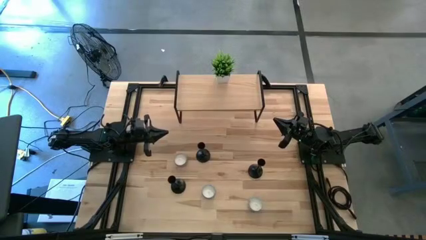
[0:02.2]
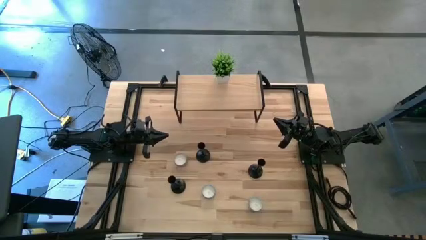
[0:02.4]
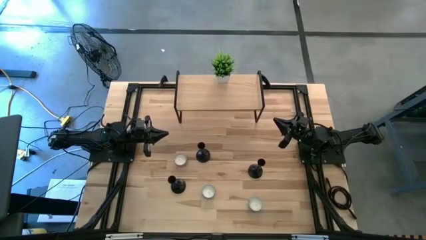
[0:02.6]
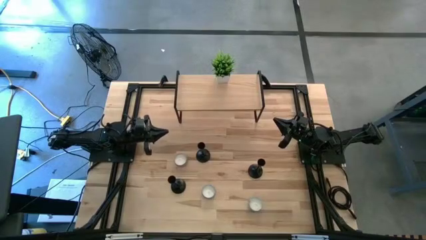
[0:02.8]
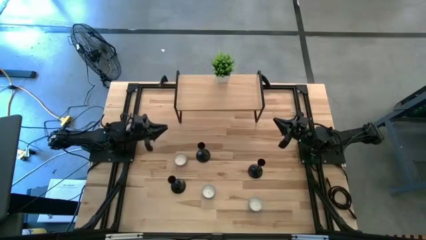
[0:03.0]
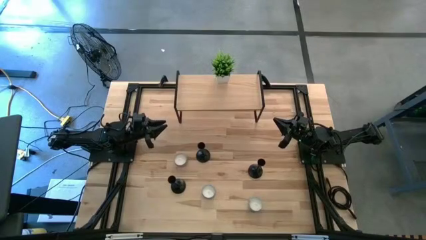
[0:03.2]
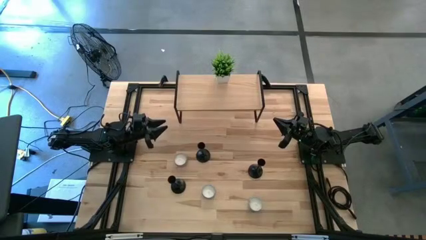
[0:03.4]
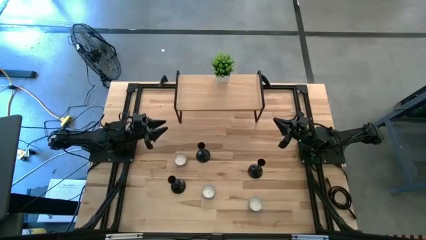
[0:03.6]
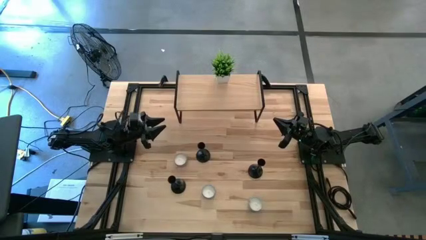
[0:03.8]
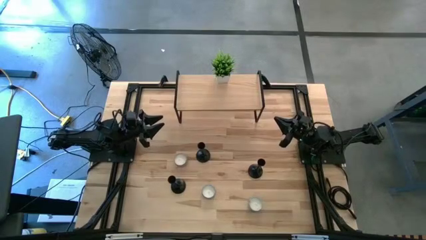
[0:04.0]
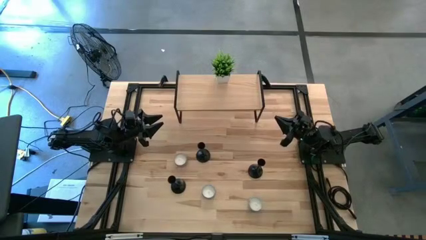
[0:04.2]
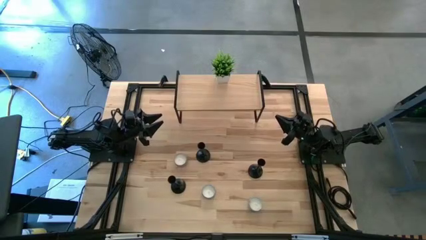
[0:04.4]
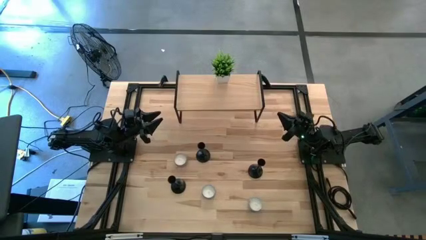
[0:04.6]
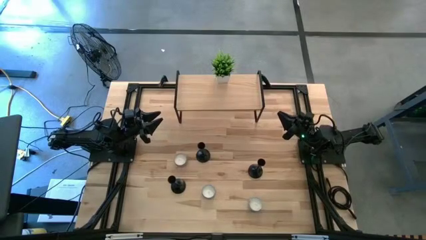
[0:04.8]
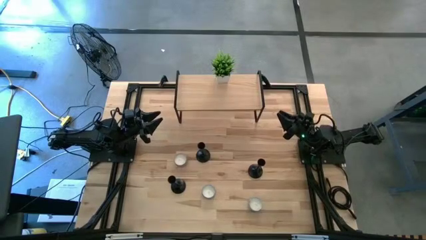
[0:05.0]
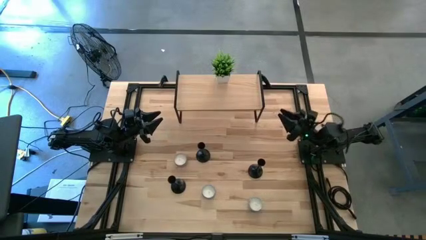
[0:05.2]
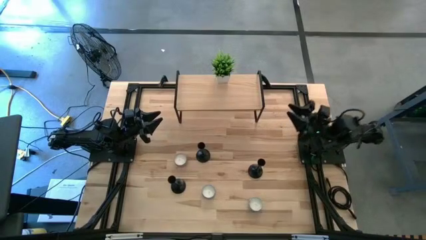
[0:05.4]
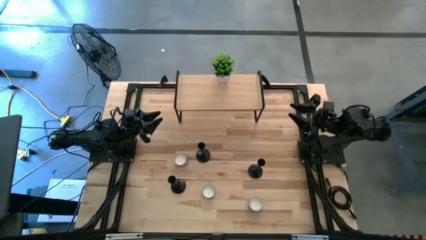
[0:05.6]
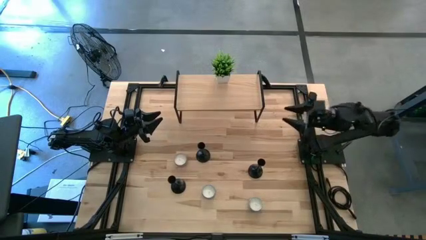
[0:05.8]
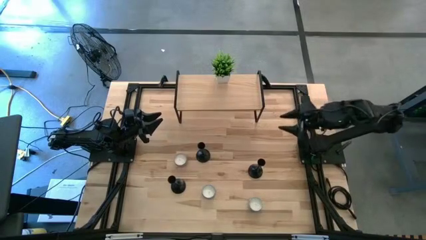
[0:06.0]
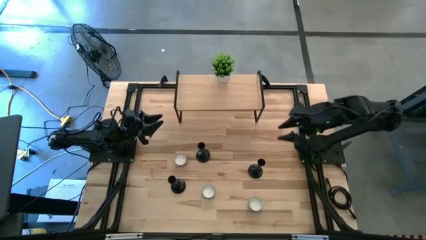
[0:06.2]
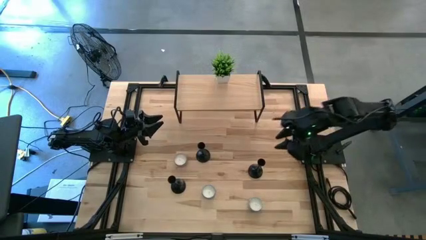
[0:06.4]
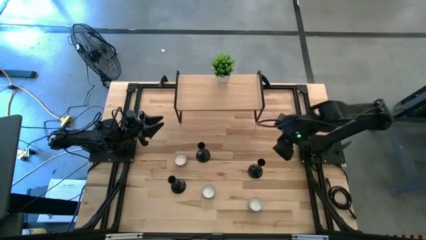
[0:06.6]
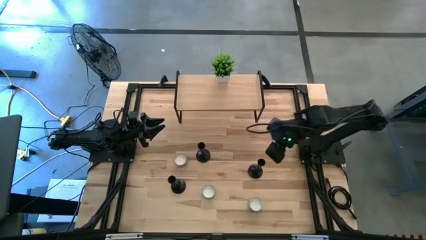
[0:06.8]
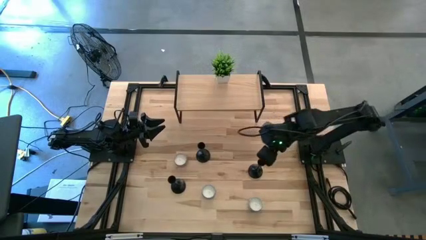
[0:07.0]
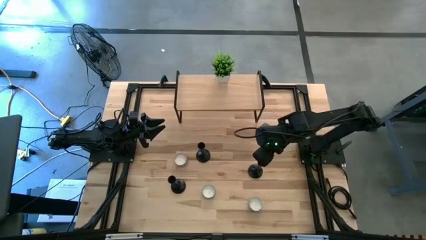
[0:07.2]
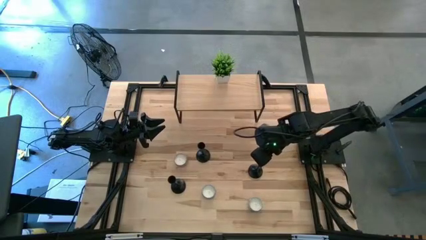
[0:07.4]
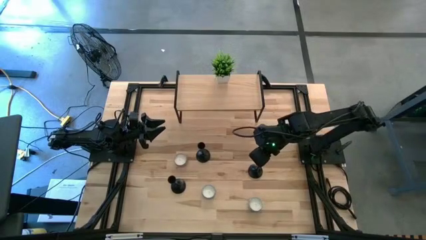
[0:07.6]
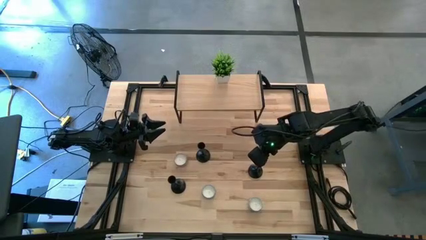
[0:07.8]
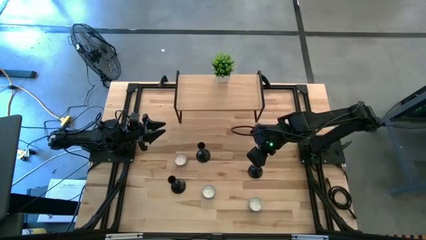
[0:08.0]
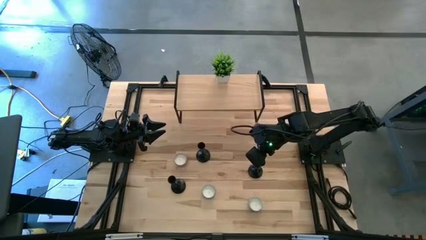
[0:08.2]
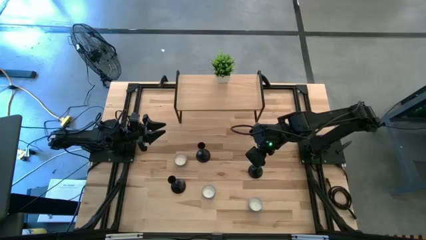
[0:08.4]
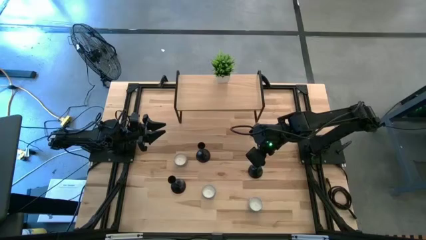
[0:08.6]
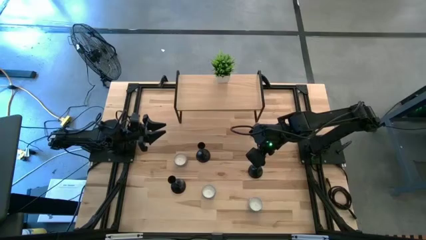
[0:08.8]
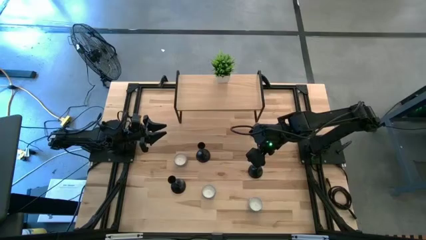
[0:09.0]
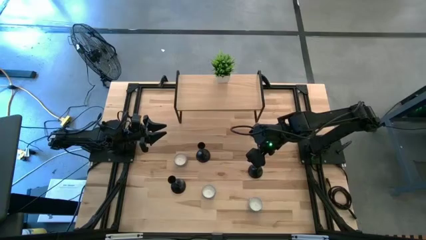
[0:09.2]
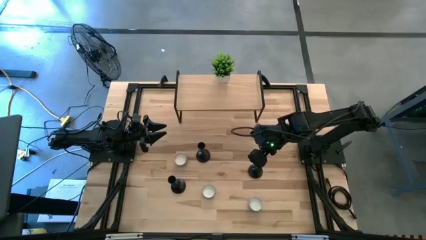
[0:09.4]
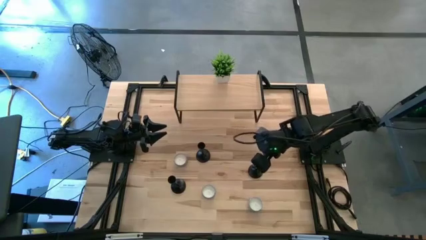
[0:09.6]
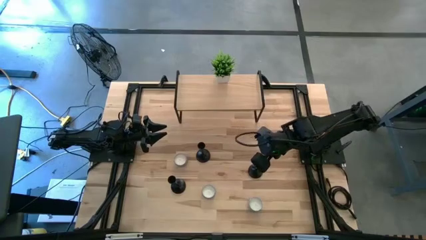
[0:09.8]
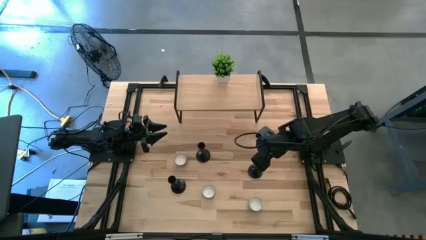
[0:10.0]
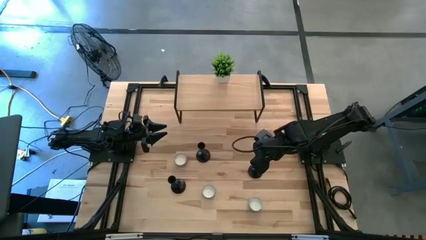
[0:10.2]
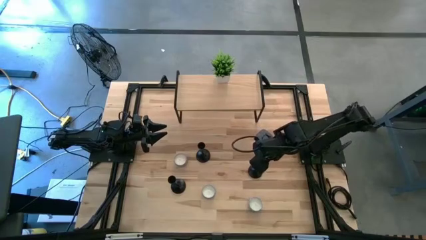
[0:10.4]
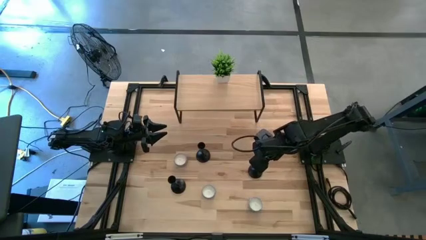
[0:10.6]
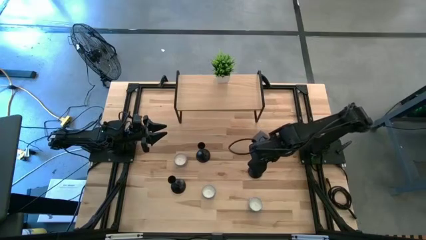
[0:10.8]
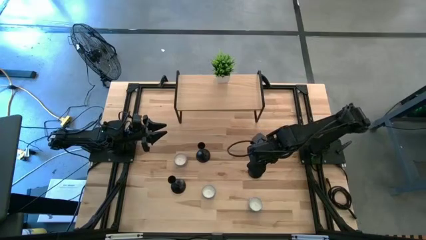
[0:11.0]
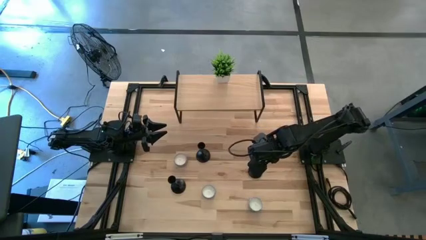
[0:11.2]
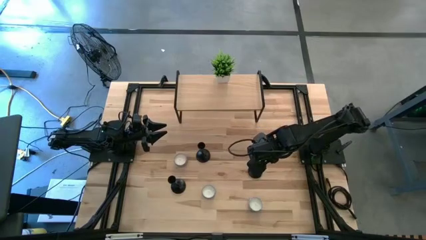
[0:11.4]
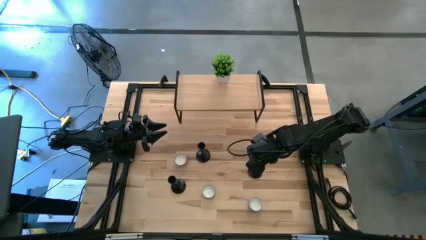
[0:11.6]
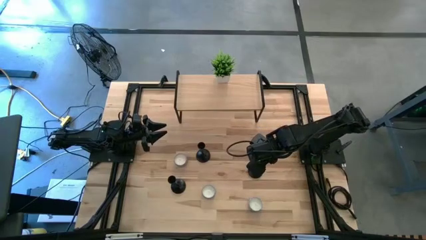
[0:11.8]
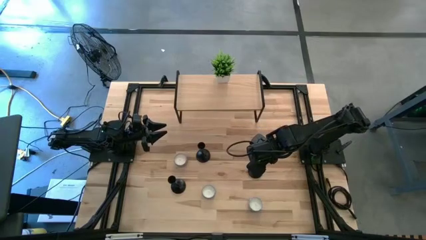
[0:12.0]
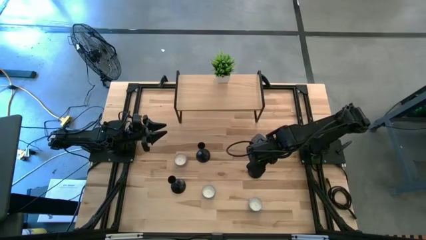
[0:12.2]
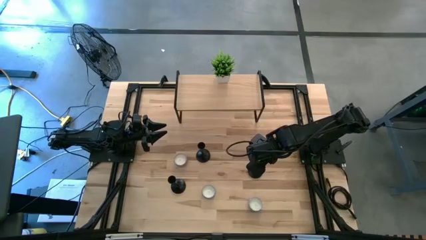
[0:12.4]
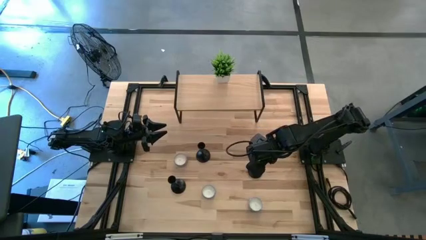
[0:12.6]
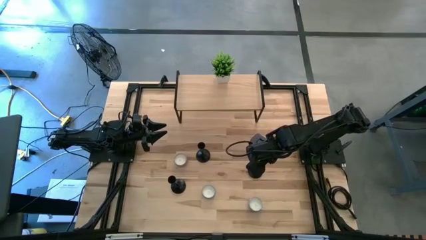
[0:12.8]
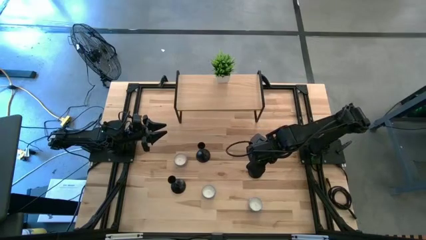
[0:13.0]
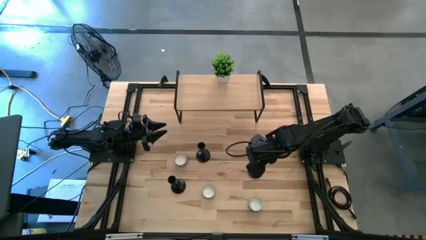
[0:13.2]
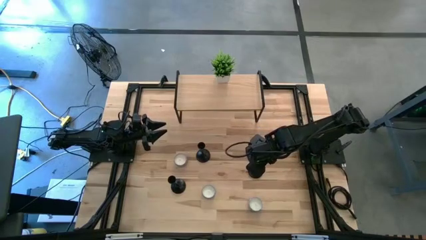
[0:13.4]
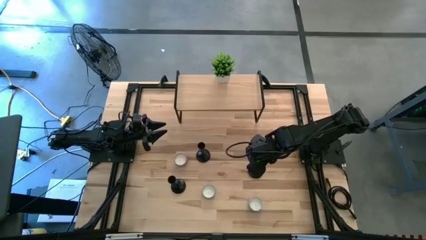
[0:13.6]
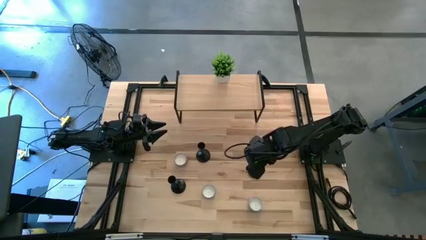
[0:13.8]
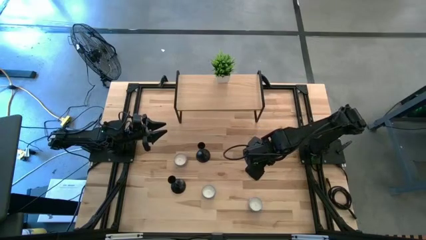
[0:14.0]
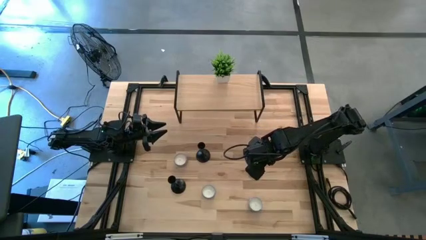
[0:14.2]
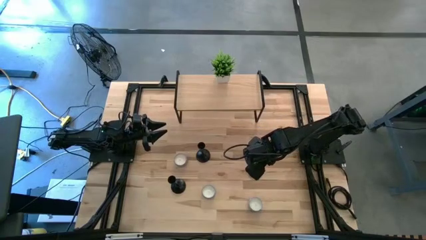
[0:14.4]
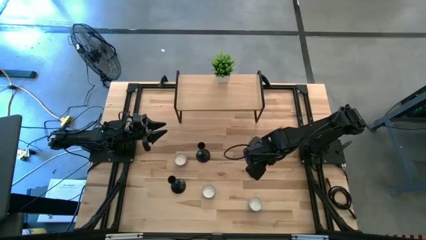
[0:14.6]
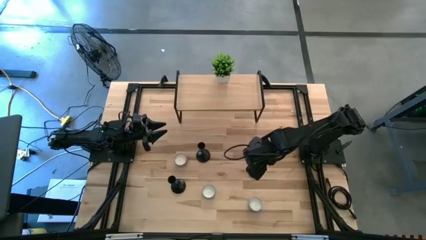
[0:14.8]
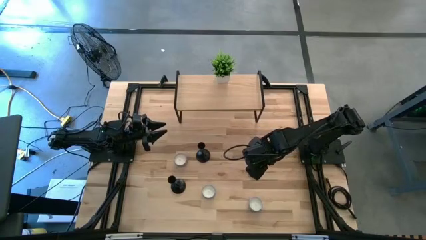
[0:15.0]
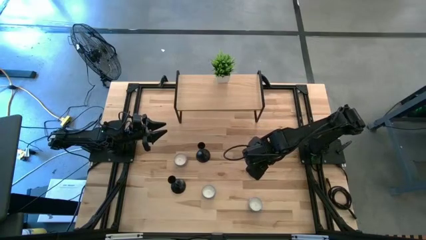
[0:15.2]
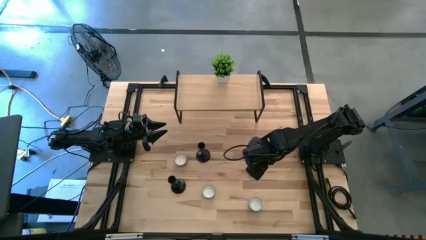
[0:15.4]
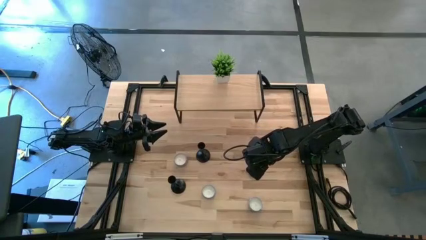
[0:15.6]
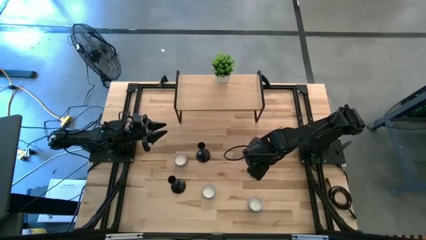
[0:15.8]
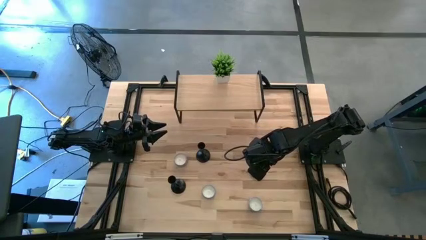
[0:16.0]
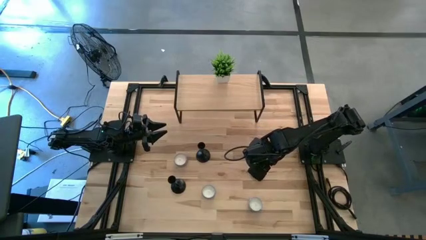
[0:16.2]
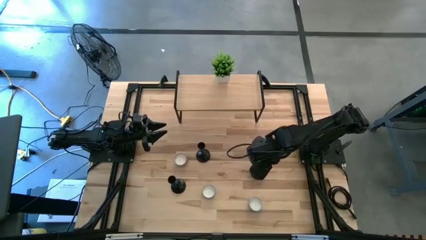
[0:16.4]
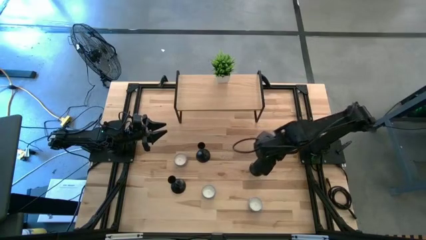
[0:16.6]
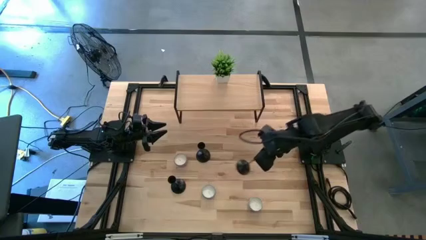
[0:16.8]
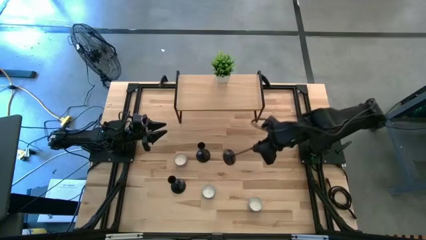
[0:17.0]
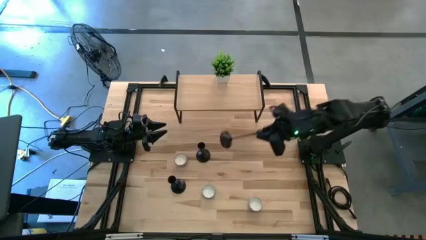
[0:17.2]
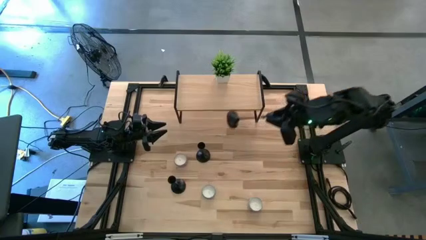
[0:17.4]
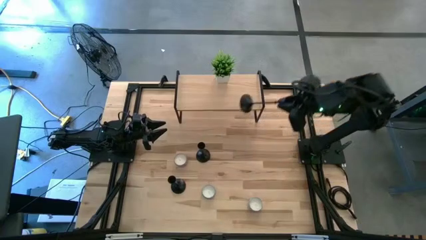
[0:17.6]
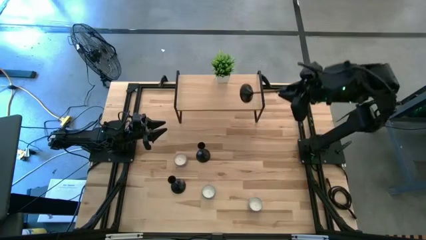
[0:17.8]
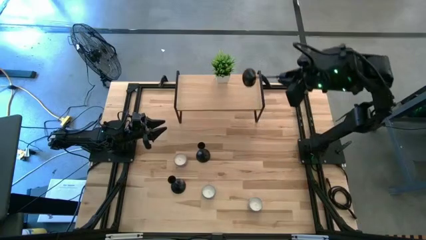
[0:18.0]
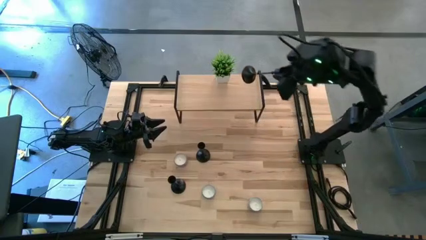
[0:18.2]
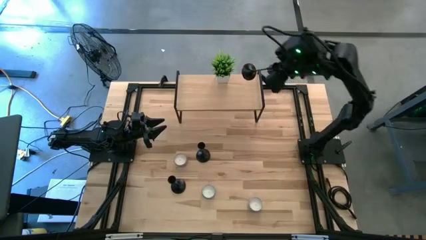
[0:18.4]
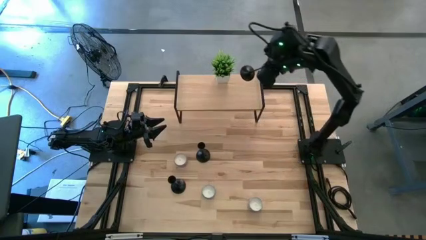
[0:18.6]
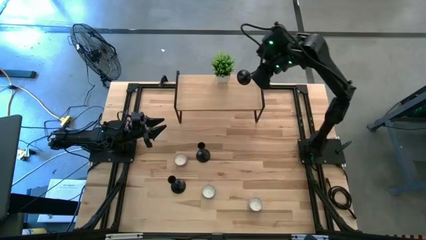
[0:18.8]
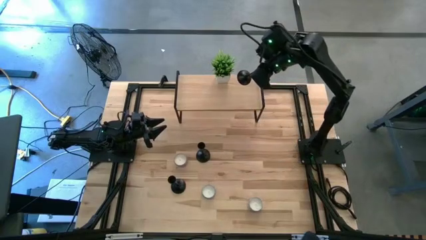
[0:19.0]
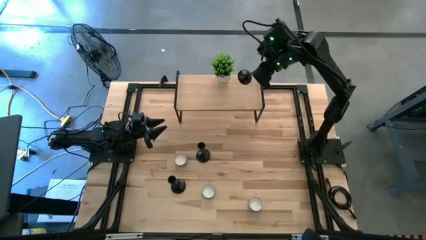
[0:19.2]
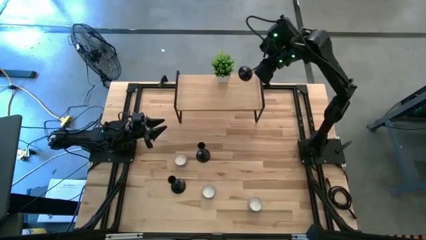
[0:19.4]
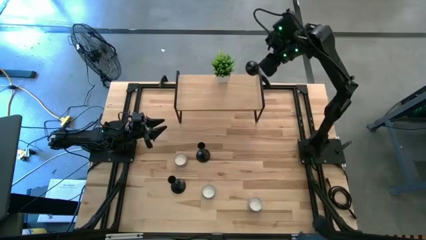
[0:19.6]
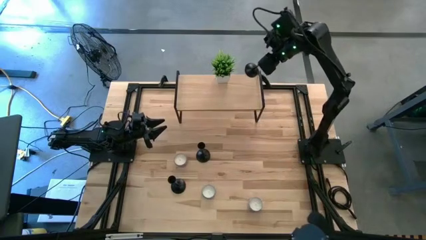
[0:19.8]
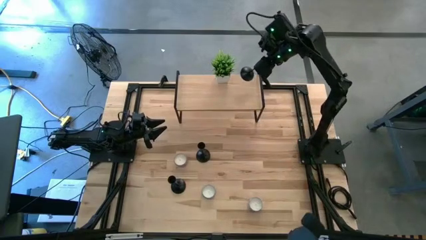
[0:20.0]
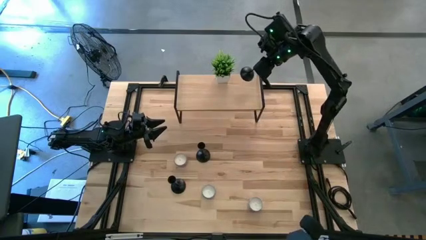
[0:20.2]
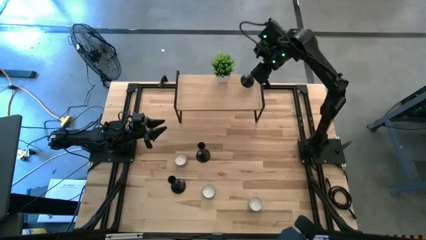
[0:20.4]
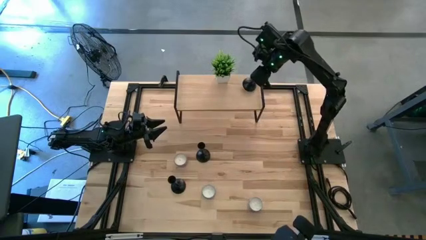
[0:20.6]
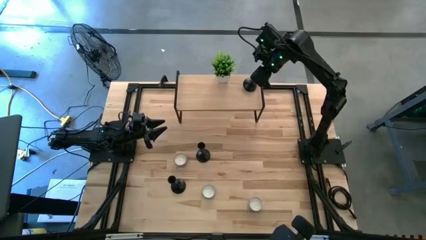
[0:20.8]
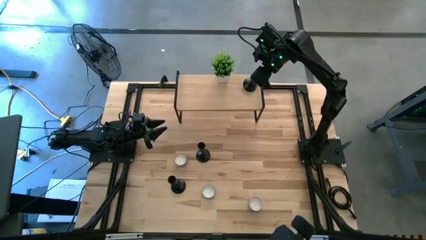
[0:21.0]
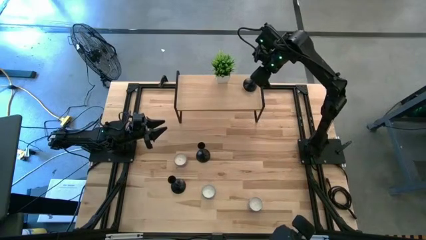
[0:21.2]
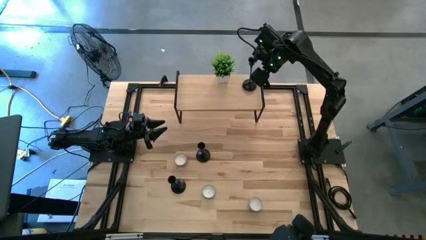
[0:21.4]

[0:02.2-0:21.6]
Task: Pick & Place candle stick holders
Put the right black candle holder on the shelf
